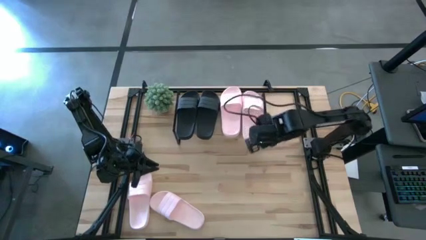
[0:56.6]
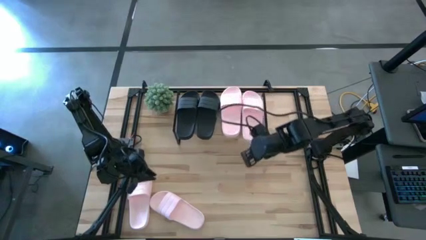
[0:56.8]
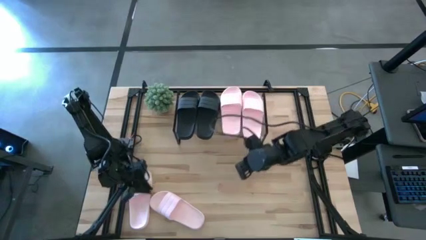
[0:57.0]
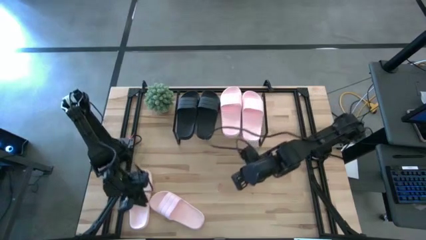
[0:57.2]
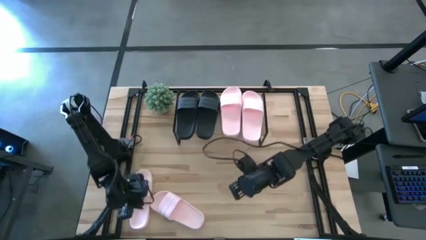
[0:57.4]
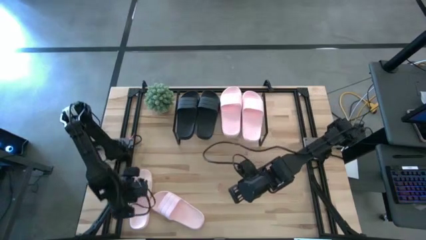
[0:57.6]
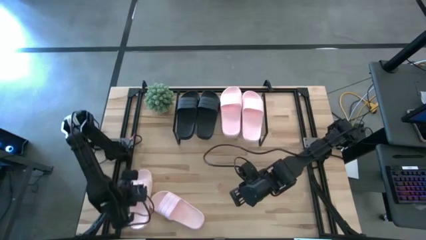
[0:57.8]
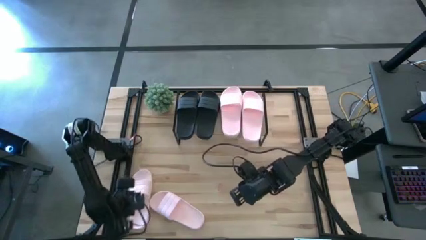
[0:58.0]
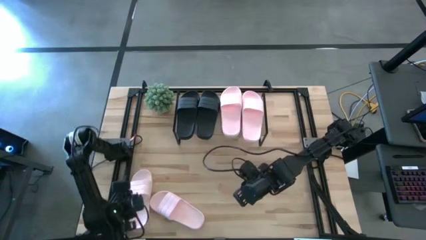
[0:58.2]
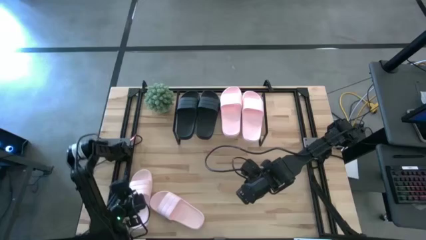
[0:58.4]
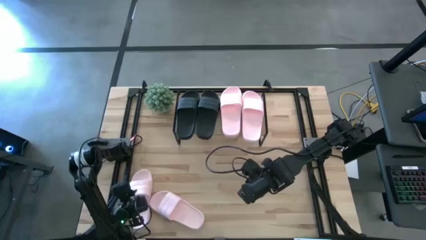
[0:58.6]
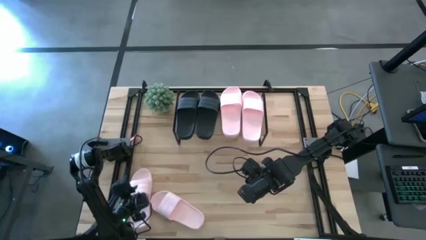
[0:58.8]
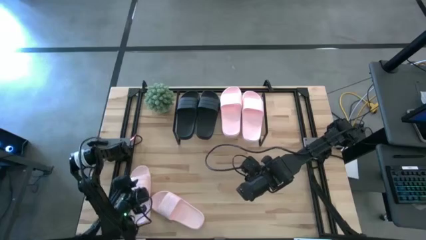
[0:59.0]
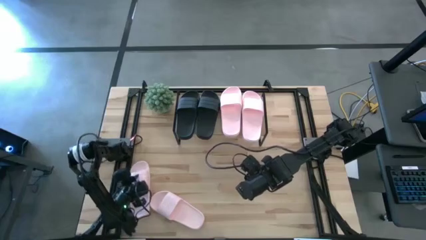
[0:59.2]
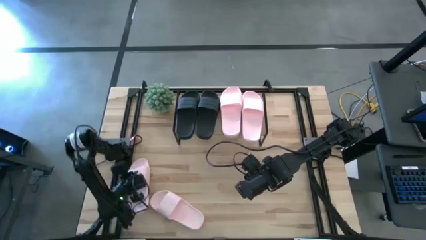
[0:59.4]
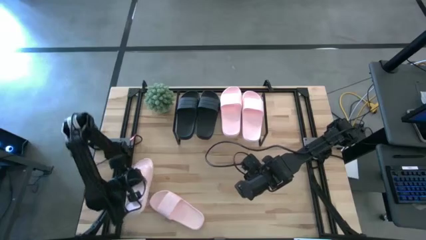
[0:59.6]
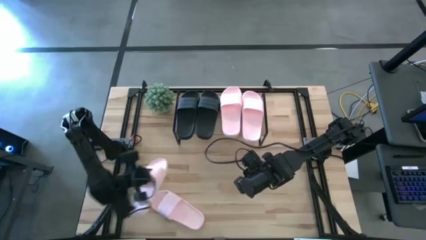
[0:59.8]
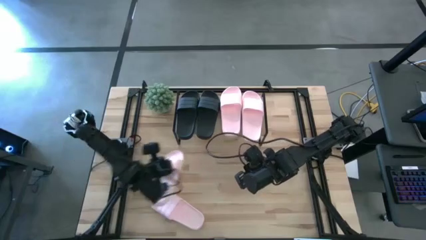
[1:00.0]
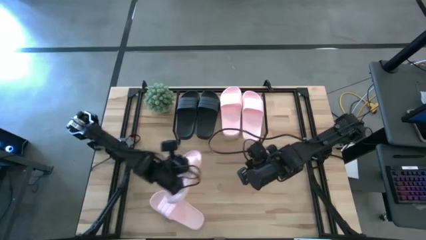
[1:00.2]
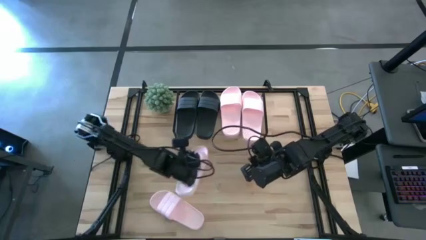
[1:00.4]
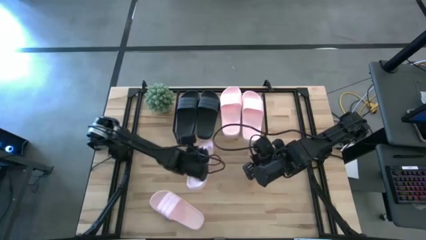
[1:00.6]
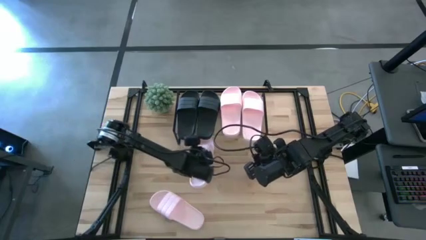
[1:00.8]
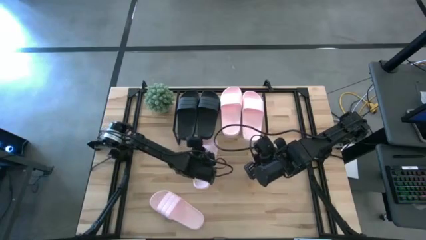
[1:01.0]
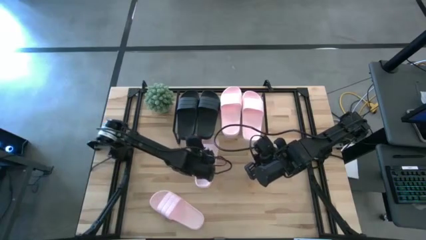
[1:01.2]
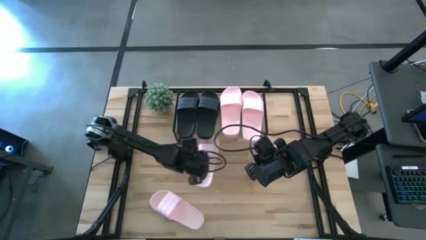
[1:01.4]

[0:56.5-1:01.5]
Task: Pick and place slides into the shelf
Put the pink slipper under the shelf

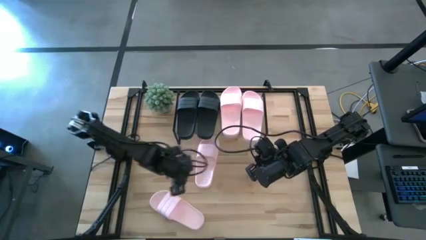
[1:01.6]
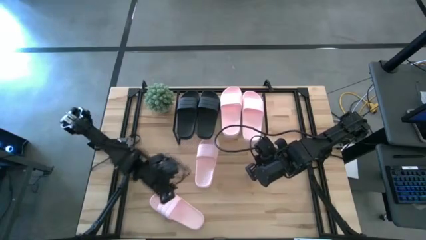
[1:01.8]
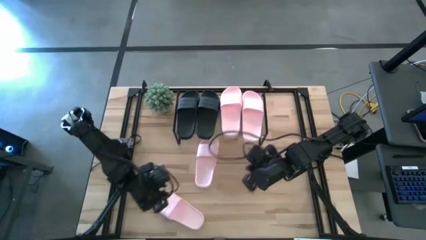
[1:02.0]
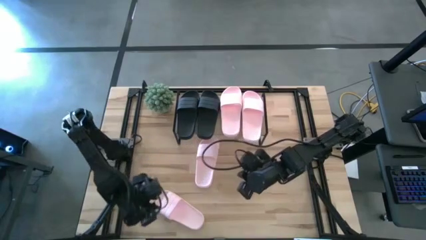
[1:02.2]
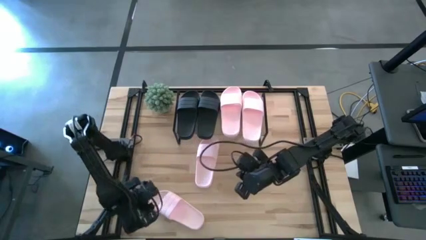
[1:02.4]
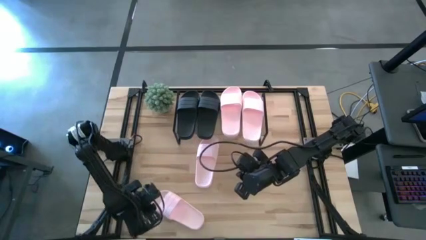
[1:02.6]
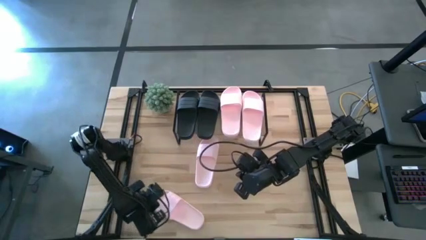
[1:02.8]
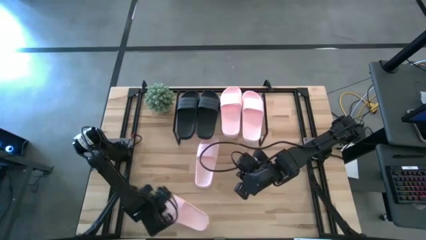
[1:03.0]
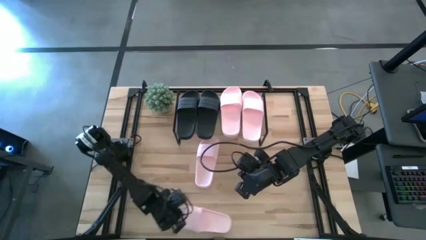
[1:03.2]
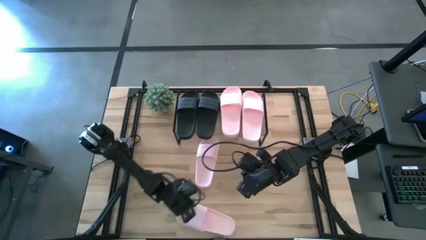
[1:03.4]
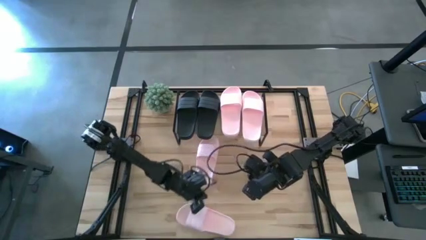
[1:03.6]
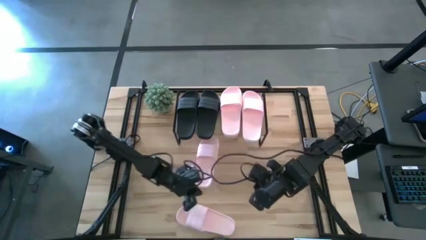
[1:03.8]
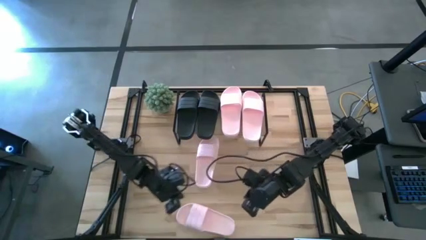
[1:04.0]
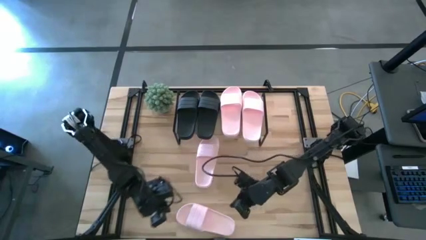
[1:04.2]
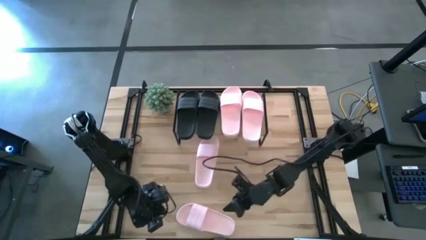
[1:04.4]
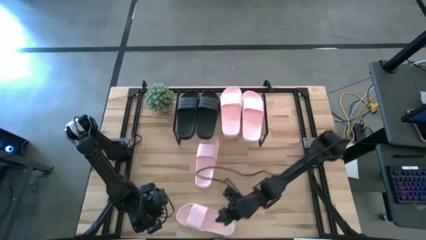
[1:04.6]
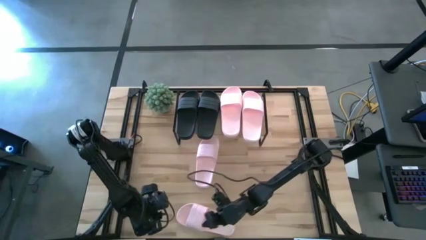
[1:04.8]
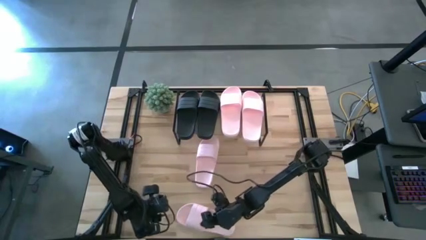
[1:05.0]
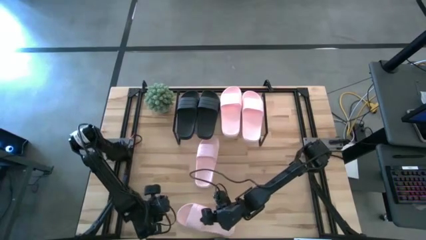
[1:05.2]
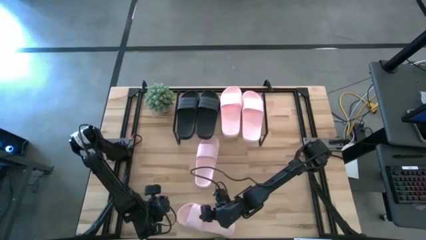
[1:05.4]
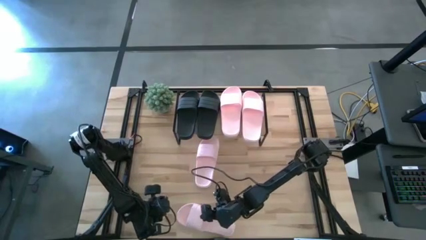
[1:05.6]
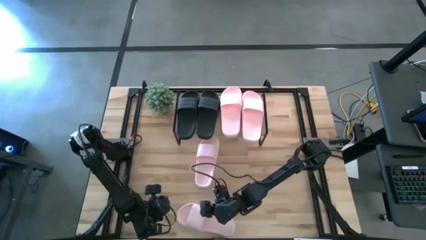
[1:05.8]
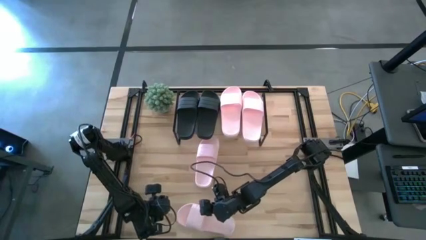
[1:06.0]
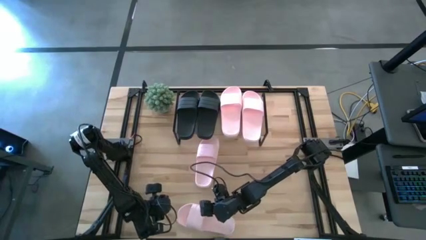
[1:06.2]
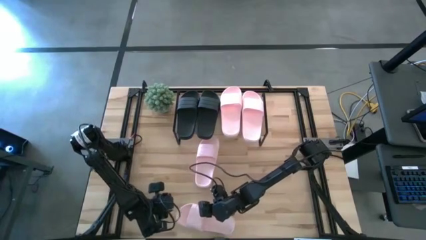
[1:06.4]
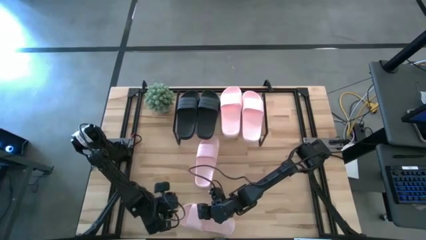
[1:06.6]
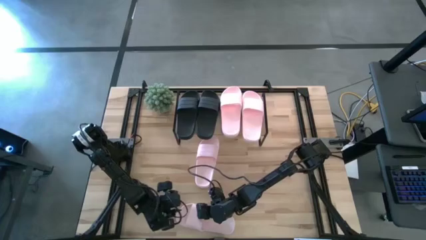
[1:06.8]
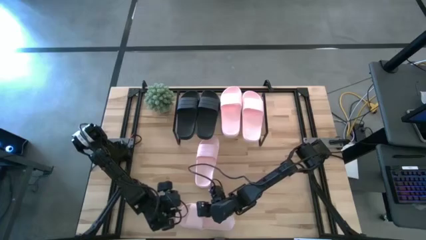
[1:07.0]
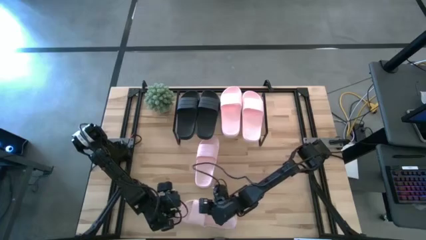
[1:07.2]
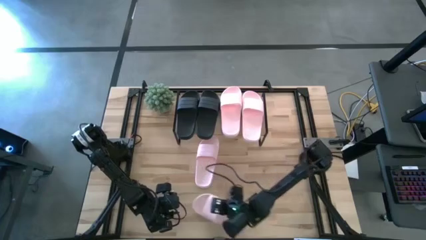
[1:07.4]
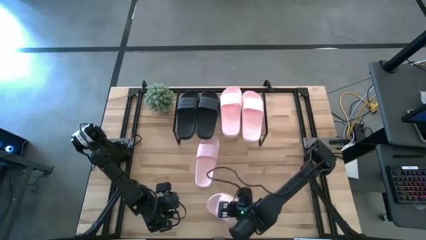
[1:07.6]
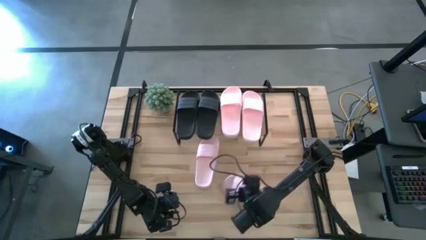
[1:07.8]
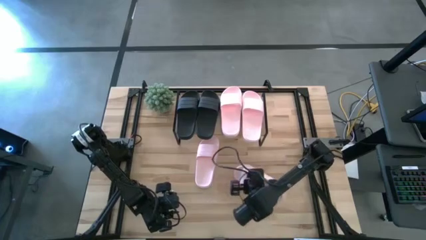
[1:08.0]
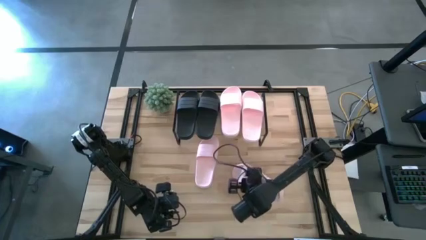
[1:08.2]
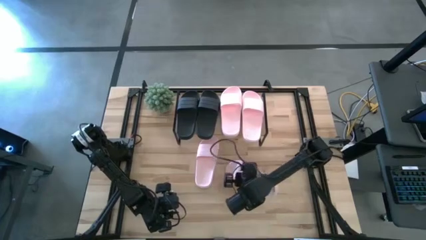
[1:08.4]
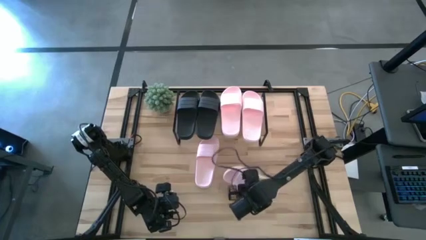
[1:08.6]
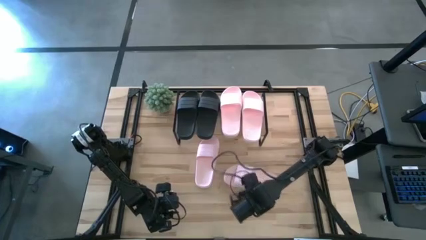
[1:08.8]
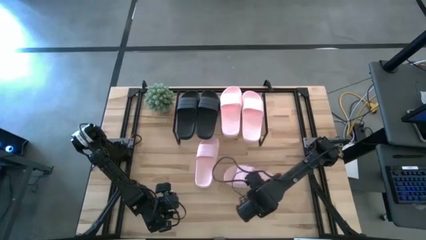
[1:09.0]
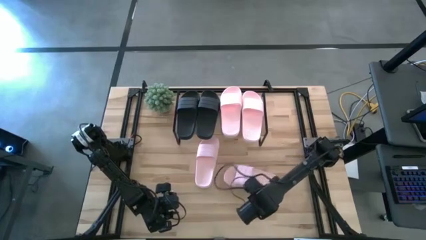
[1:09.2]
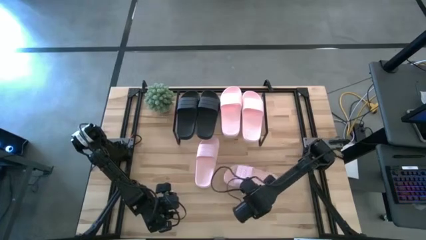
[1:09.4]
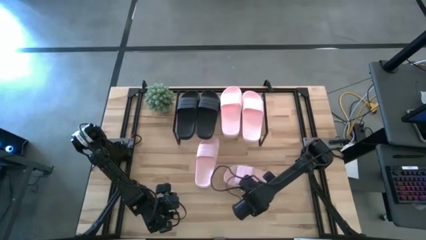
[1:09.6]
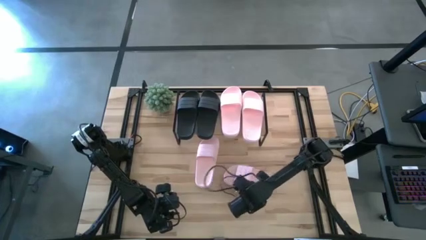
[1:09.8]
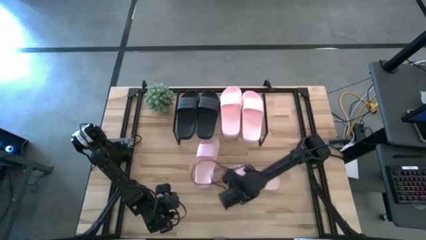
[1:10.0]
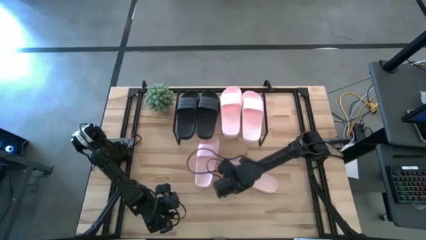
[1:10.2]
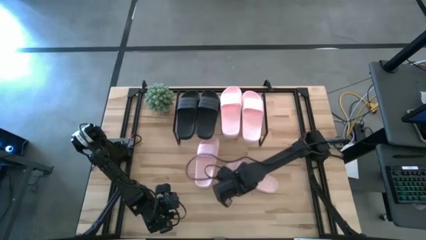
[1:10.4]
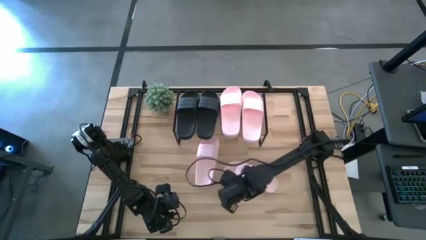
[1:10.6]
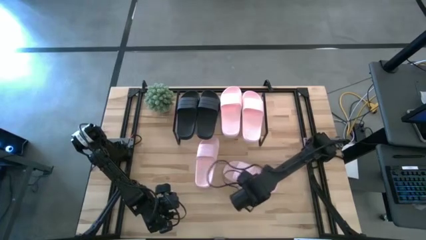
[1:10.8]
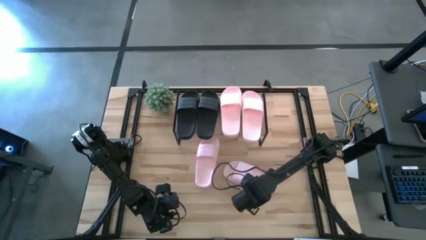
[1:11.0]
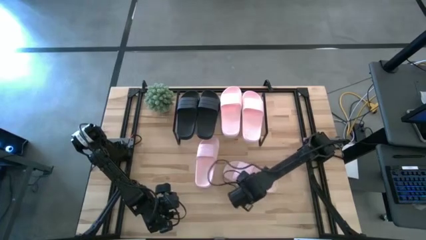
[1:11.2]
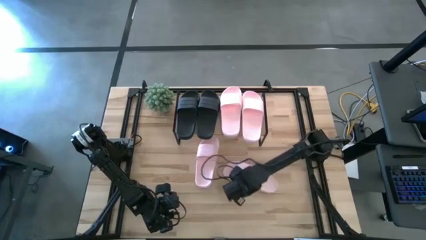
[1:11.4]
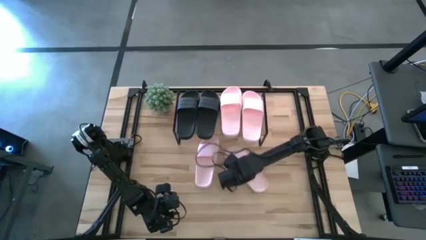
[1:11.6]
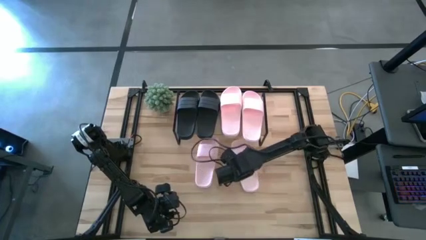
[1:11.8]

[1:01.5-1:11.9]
Put the pink slipper under the shelf

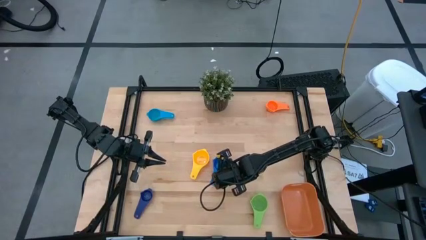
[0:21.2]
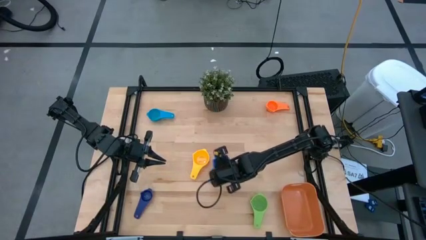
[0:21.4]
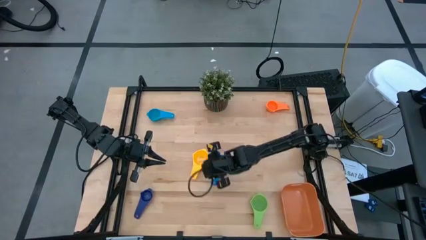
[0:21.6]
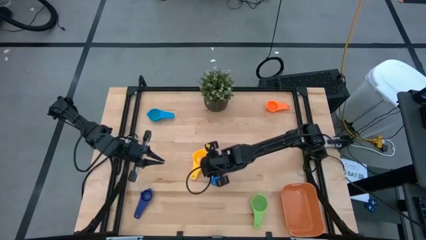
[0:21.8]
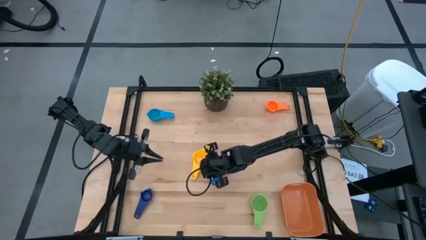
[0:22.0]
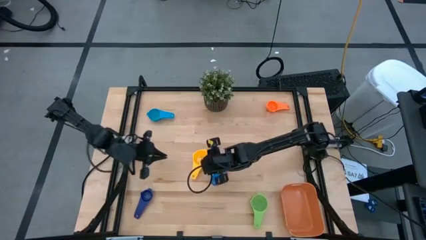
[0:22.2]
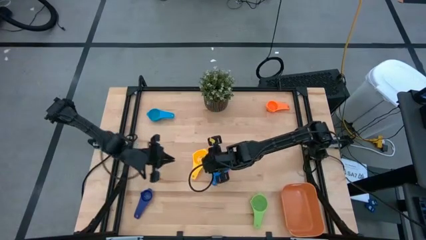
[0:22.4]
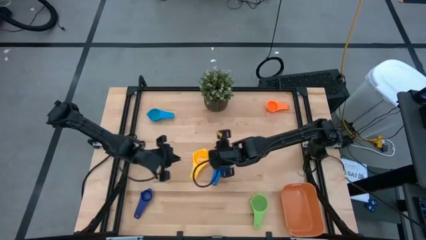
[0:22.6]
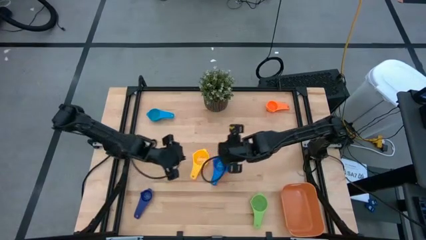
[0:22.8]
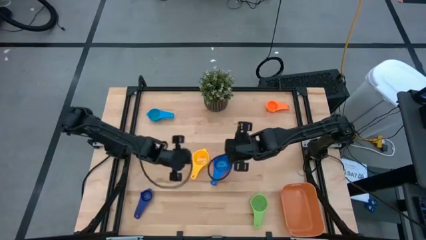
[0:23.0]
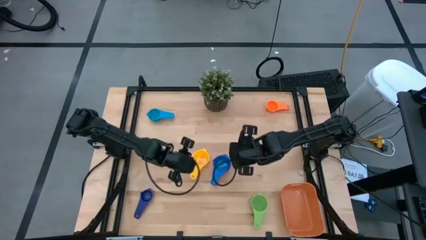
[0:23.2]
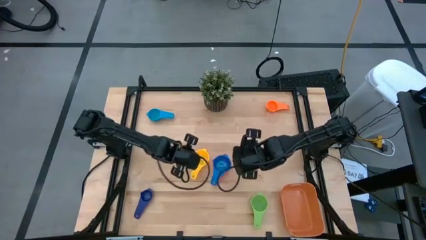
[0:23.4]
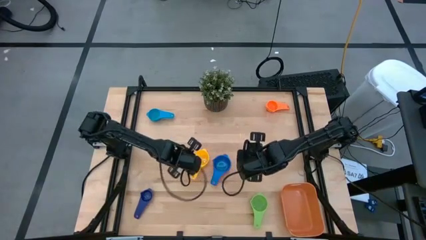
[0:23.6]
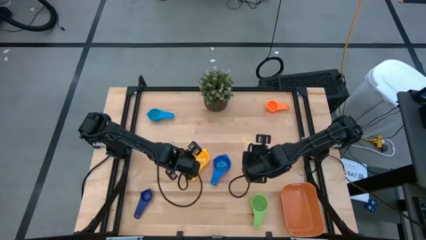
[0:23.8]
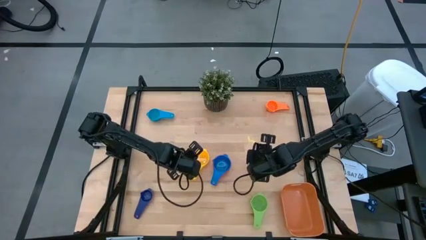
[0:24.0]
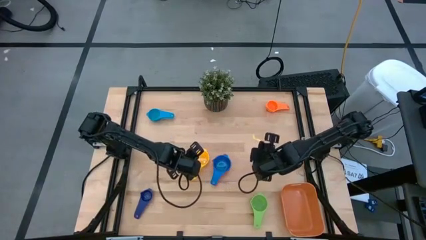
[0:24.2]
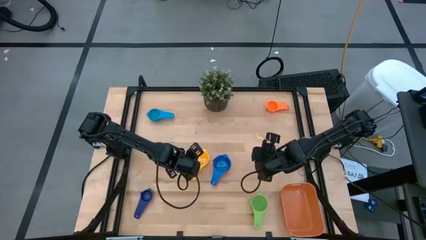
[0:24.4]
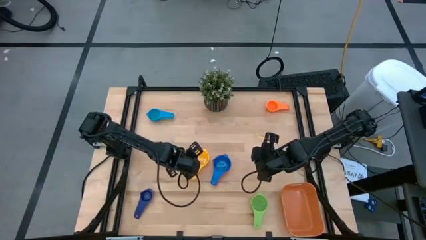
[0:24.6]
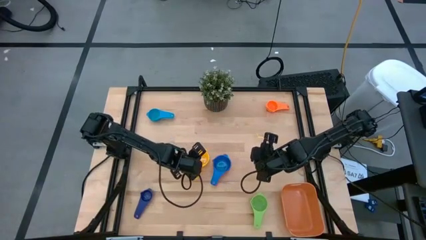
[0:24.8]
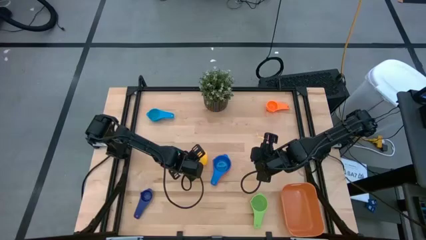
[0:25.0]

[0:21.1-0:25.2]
Task: Nest measuring cups in basket
Stack the yellow measuring cup on top of the blue measuring cup
